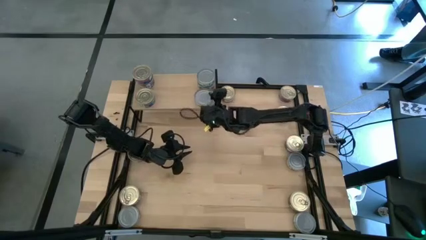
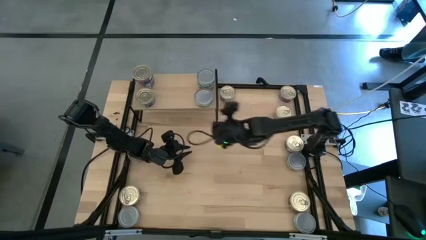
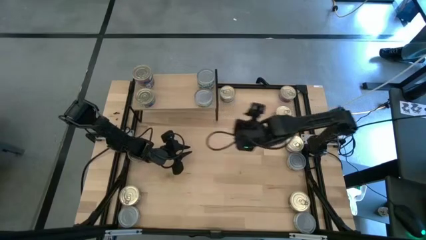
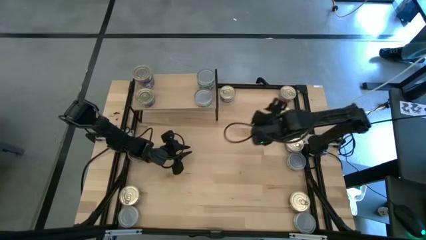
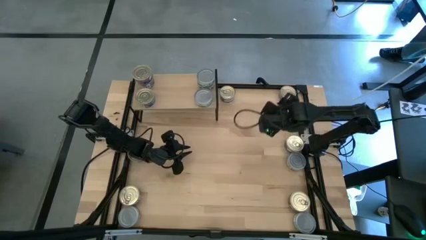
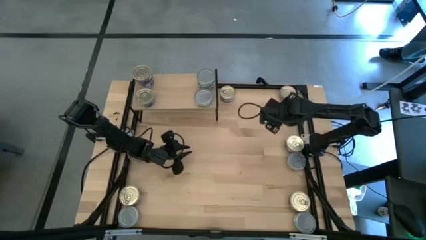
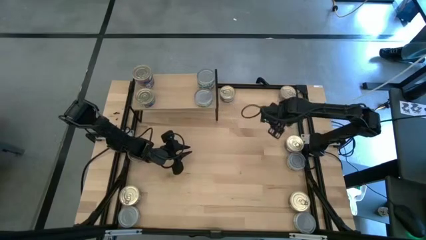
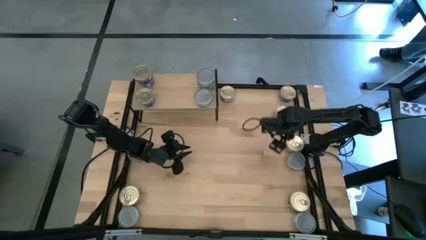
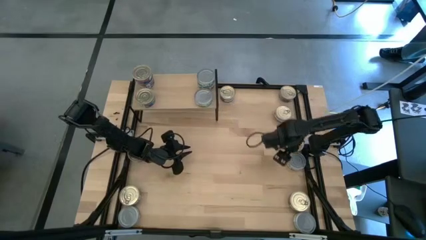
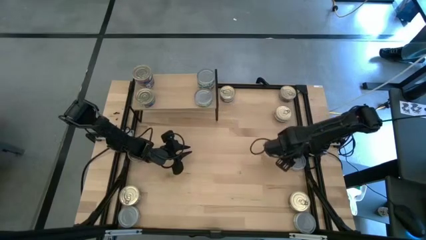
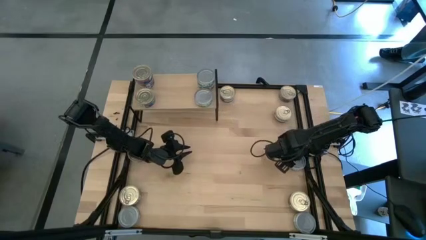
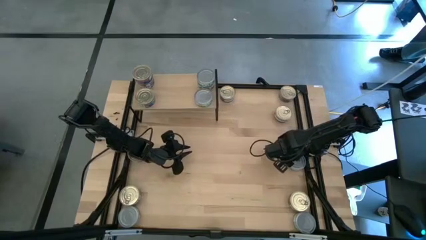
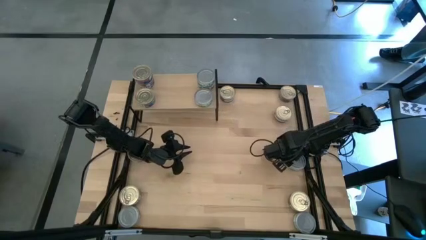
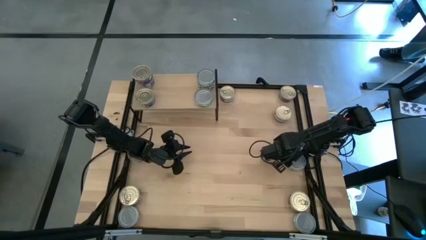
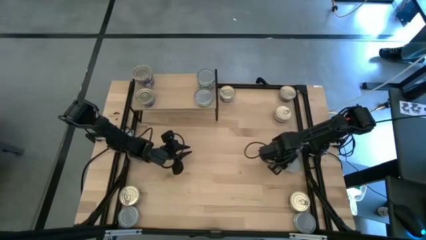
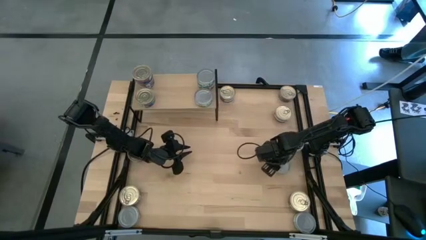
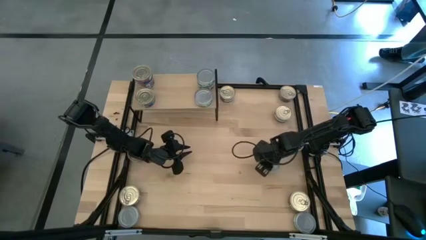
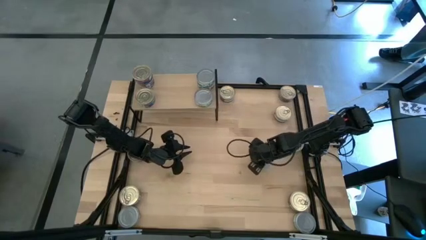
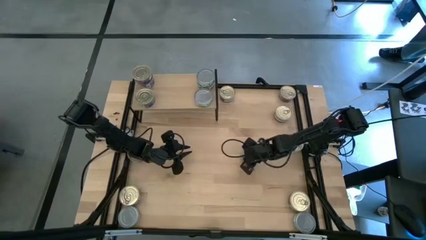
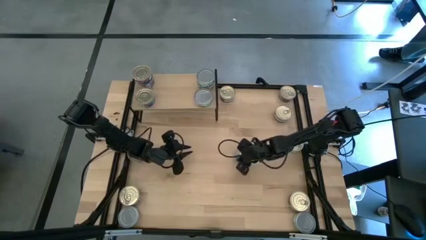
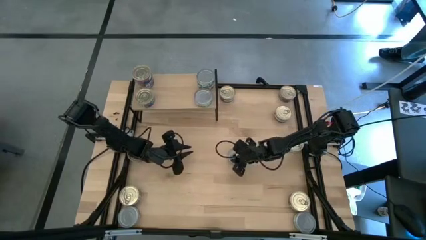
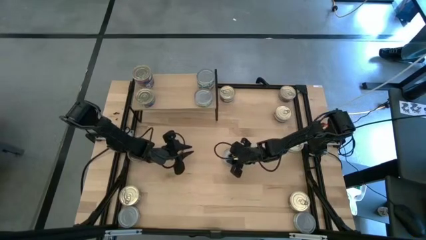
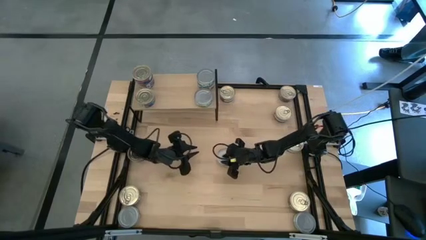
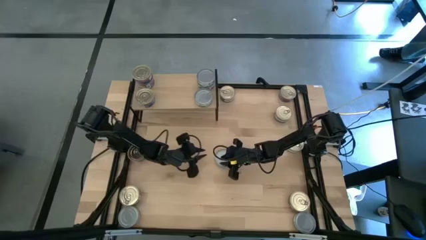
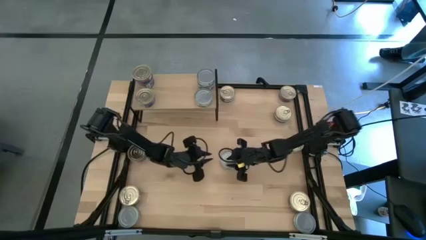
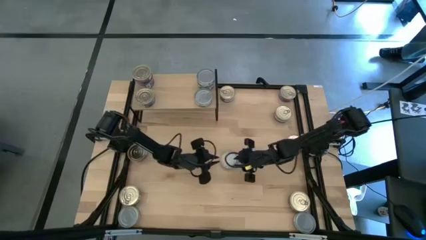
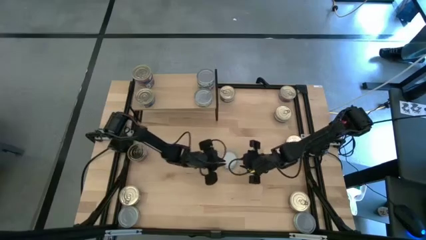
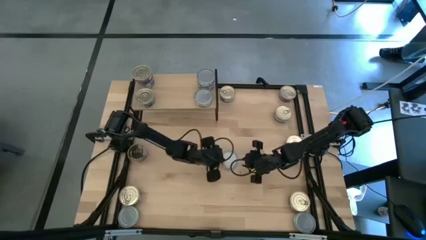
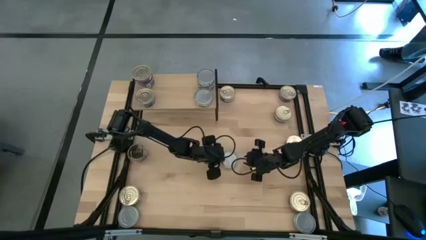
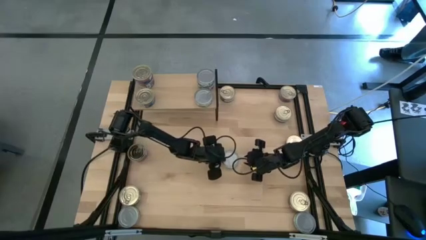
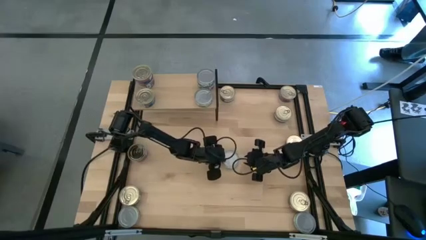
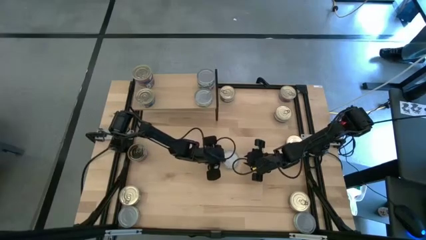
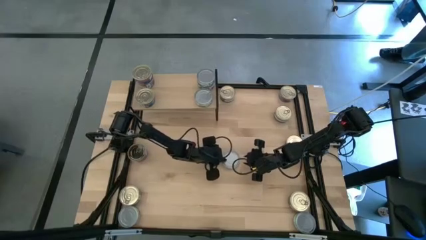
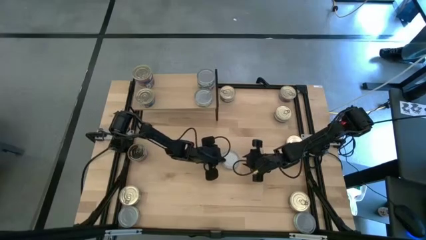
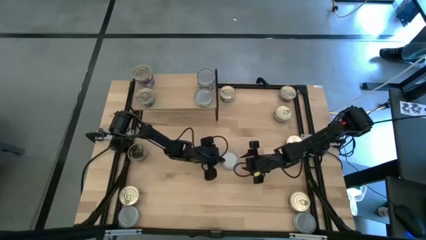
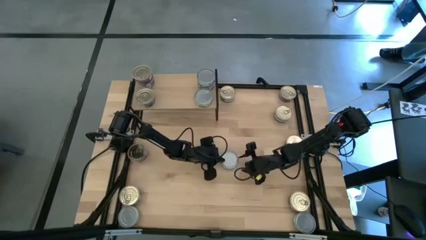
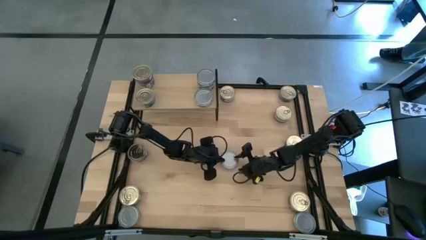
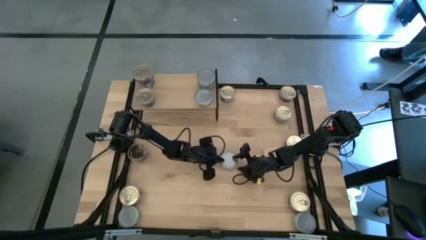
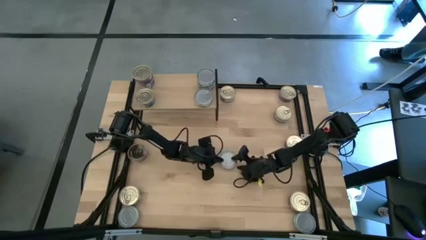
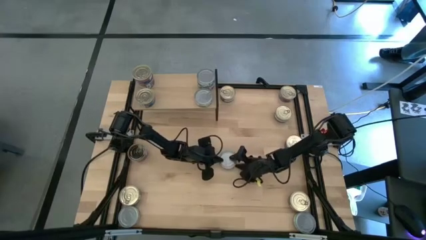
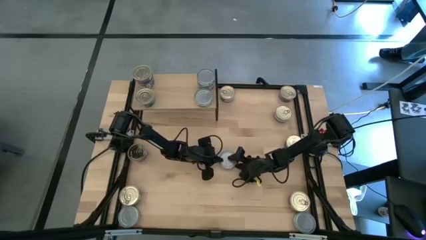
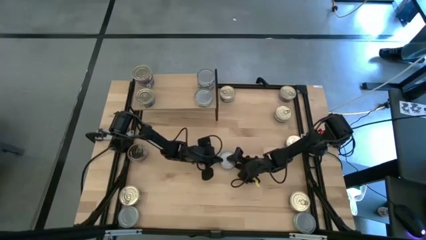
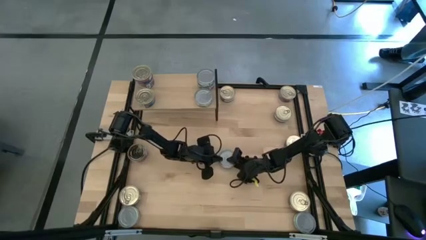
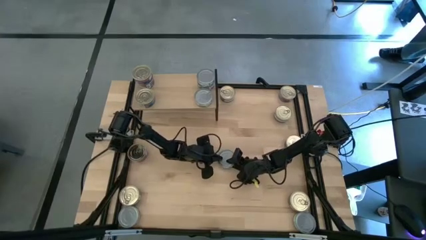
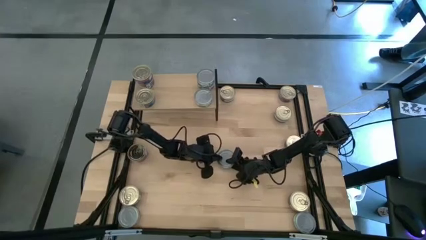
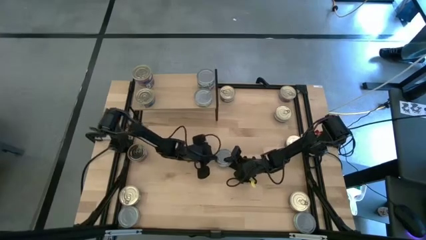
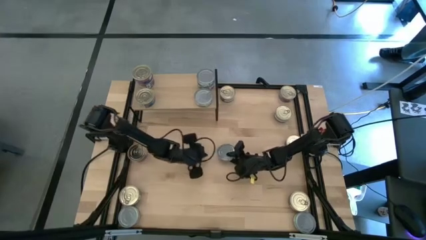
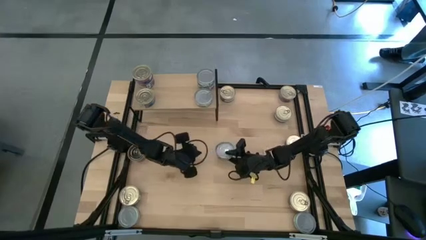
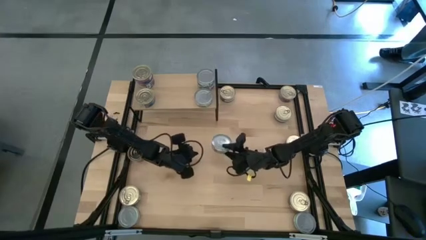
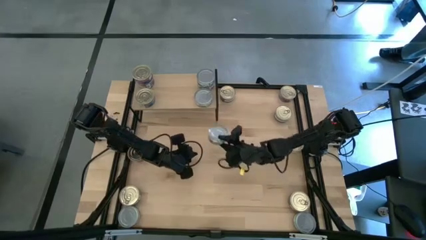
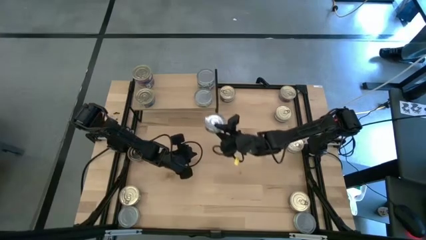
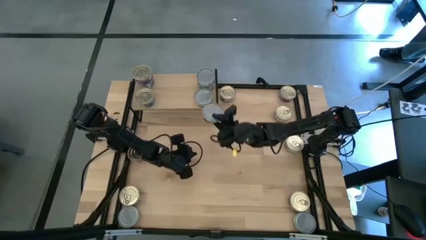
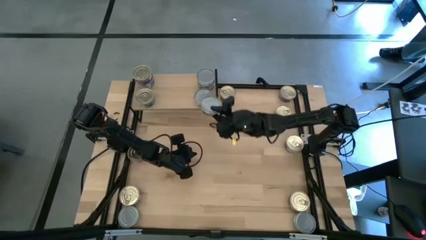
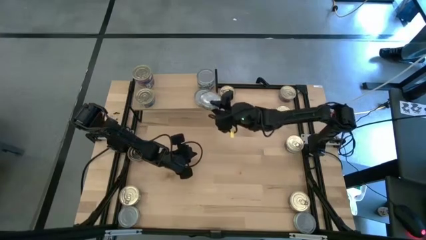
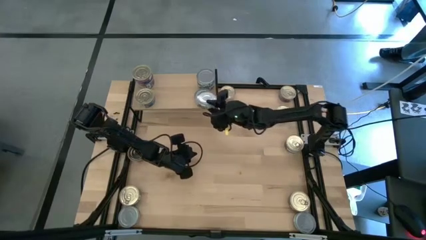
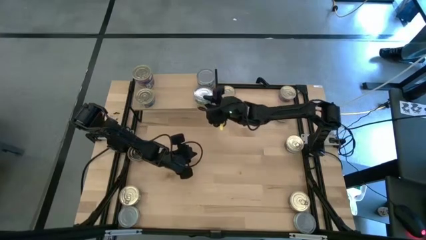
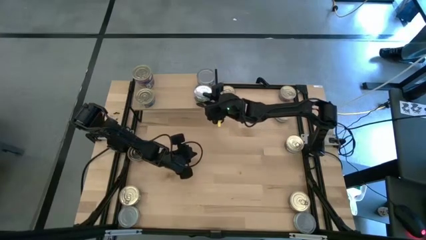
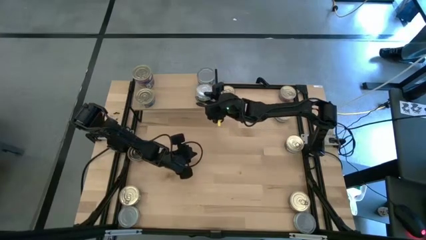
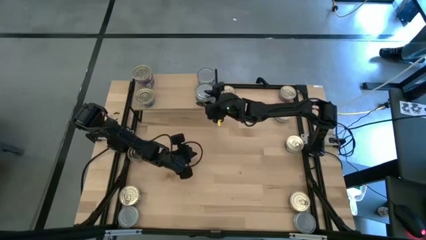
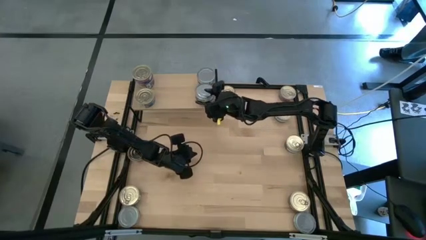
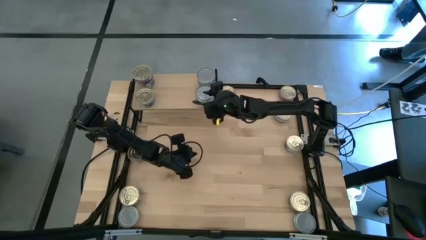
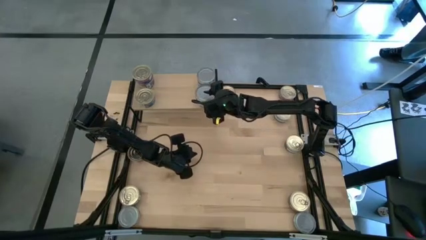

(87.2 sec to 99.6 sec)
Task: Stack canned seafood by type on shelf
Stack the green tuna can on top of the green tuna can on the shelf
